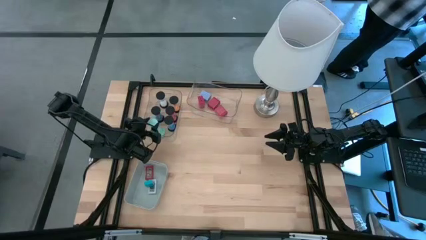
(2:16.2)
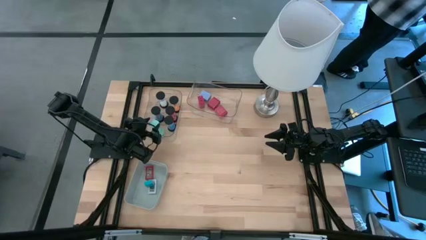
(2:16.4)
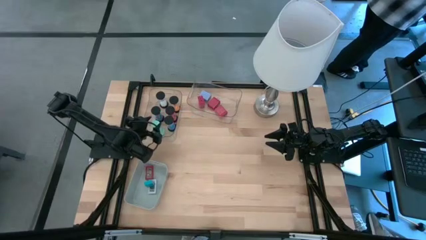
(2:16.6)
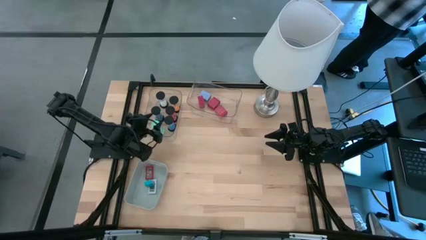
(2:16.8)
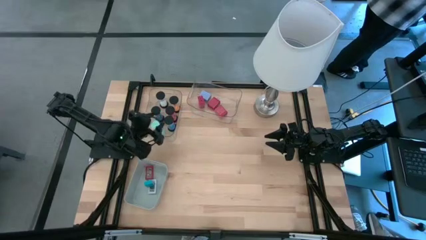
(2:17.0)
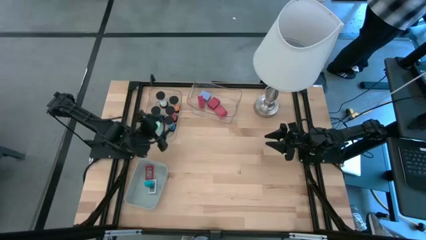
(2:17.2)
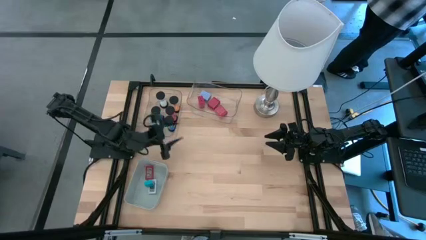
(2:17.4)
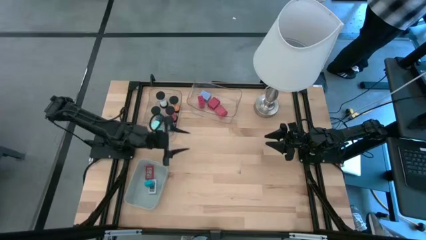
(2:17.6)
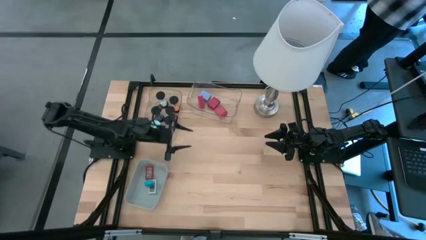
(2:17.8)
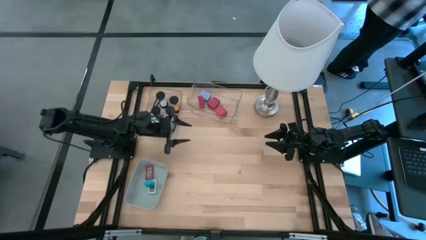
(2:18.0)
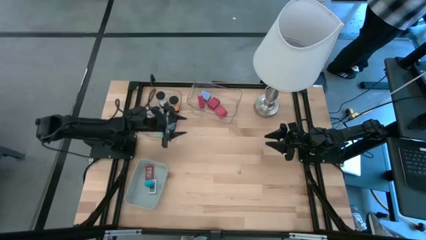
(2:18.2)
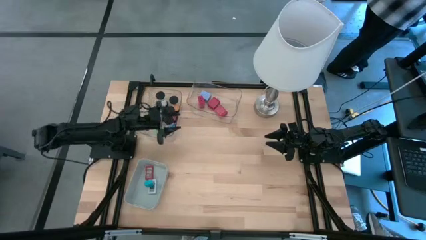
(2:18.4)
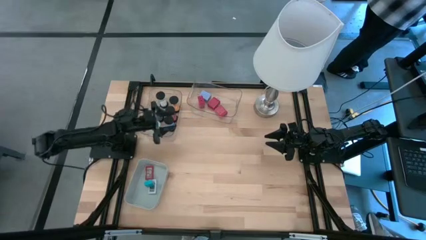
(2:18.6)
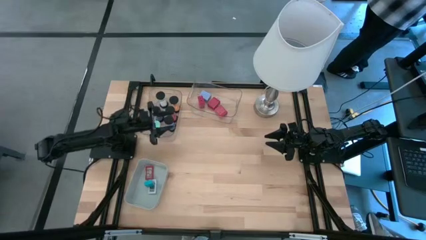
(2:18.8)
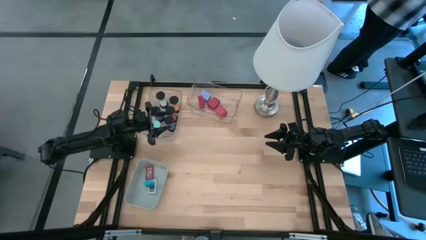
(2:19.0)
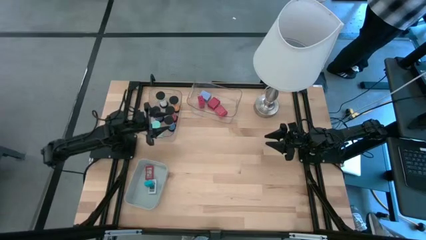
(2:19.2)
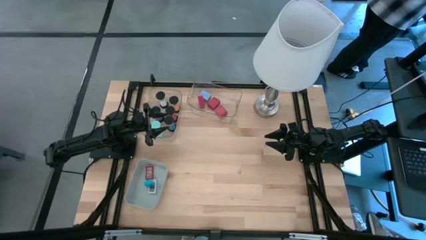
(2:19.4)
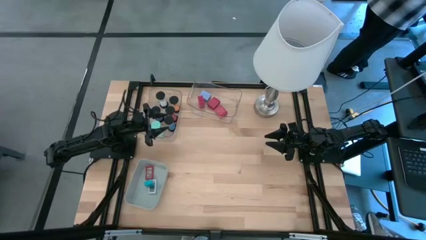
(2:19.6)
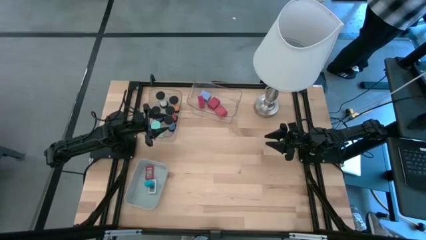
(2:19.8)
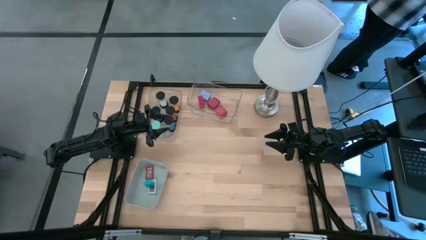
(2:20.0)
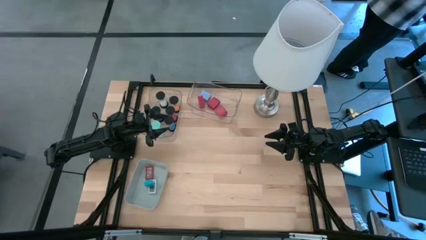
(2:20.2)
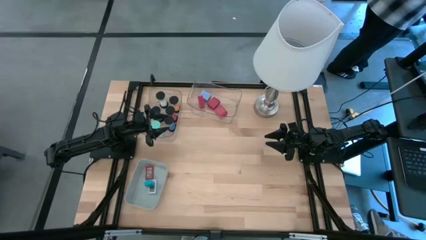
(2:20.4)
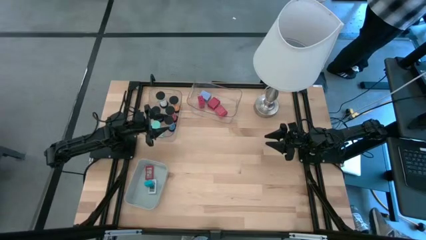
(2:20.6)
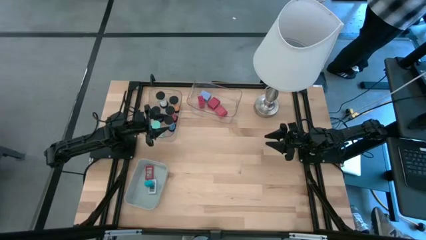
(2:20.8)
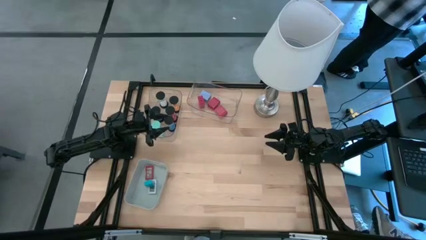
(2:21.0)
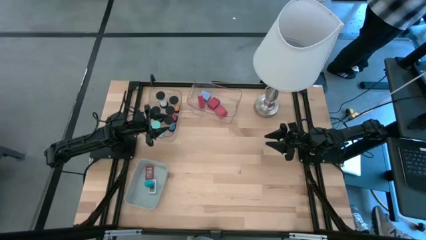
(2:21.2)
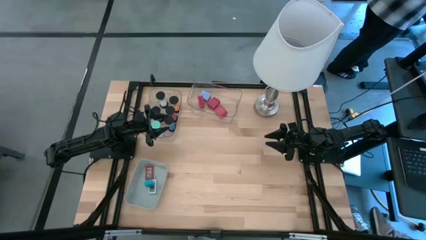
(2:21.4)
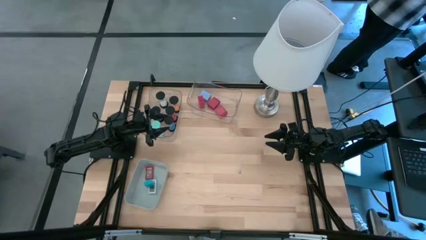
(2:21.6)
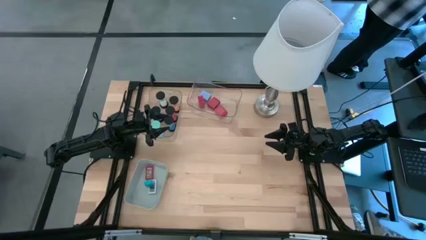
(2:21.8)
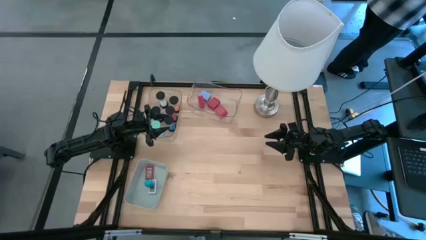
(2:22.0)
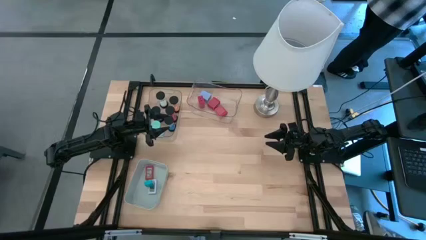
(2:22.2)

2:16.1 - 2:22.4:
Task: Pick & Place Office items
Return to home position

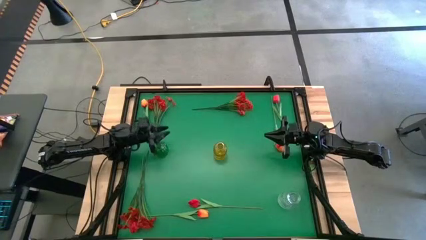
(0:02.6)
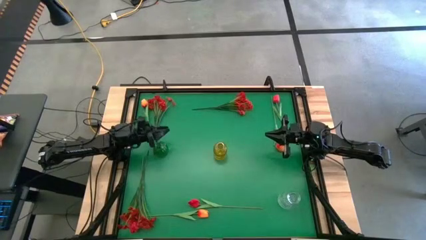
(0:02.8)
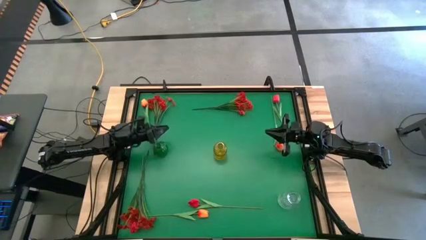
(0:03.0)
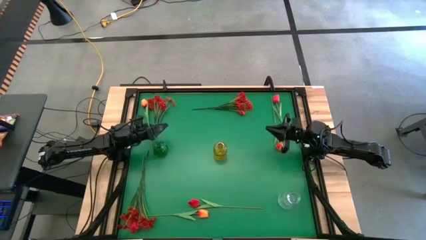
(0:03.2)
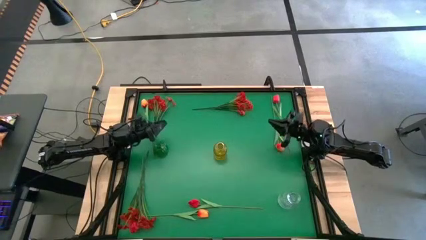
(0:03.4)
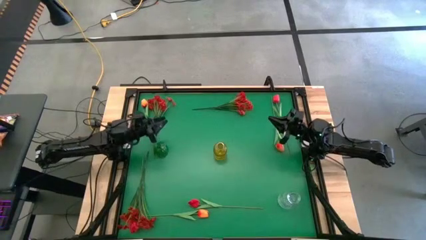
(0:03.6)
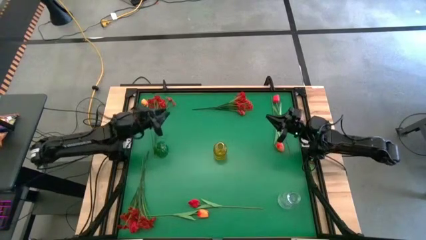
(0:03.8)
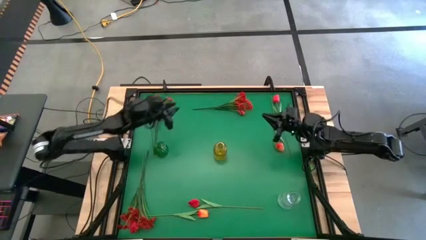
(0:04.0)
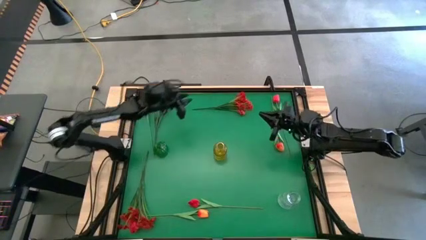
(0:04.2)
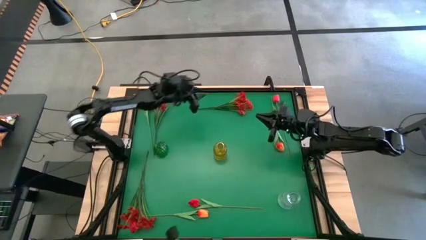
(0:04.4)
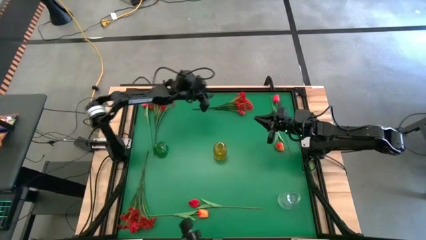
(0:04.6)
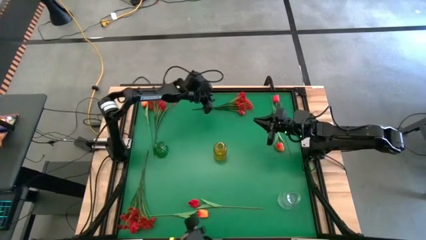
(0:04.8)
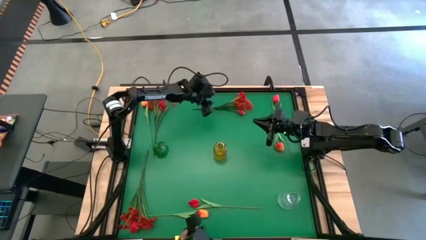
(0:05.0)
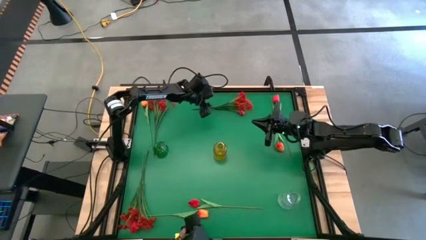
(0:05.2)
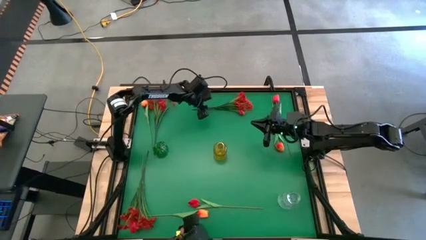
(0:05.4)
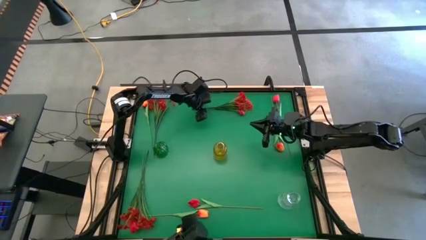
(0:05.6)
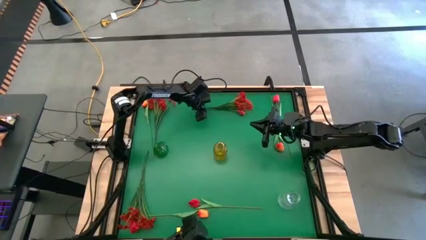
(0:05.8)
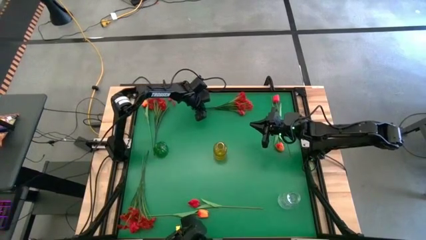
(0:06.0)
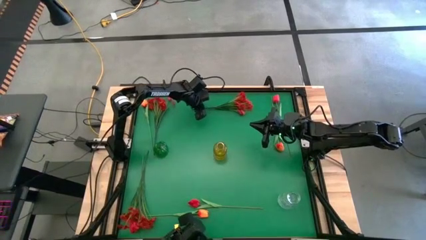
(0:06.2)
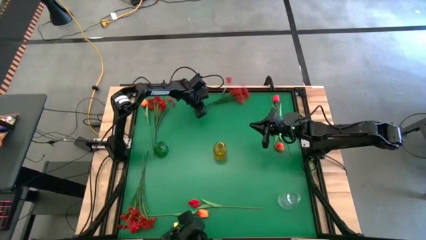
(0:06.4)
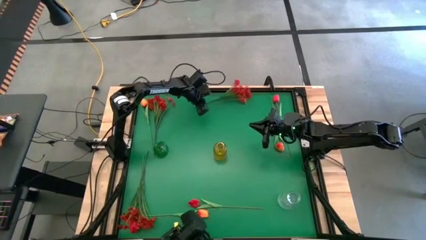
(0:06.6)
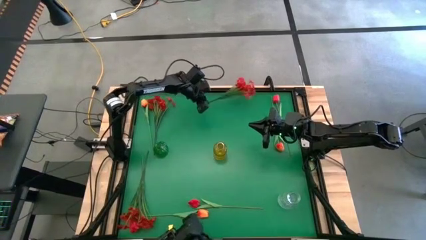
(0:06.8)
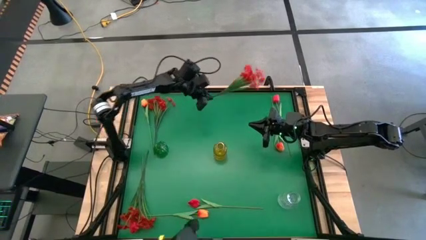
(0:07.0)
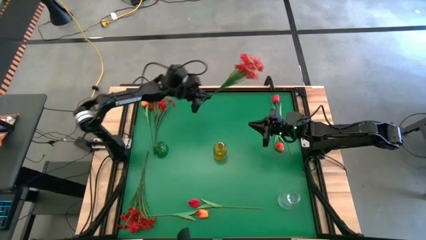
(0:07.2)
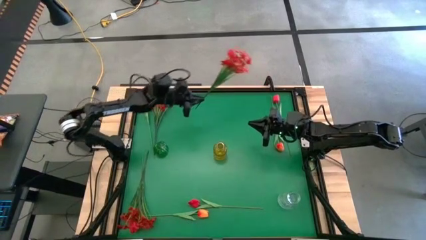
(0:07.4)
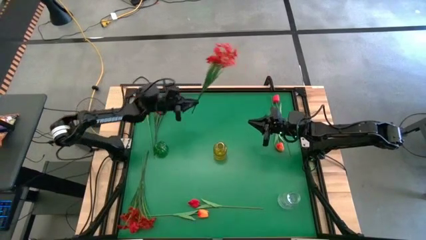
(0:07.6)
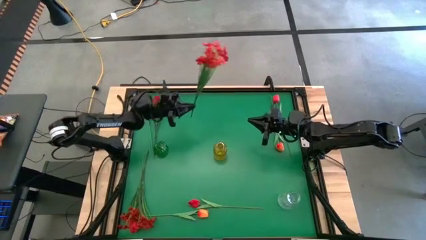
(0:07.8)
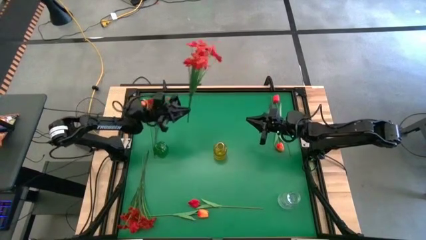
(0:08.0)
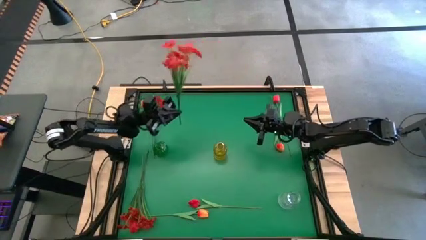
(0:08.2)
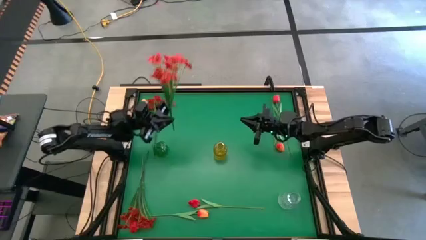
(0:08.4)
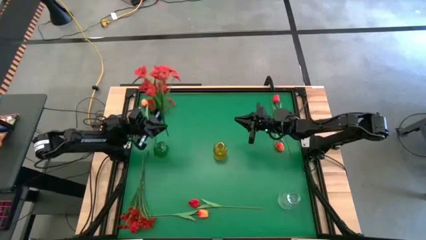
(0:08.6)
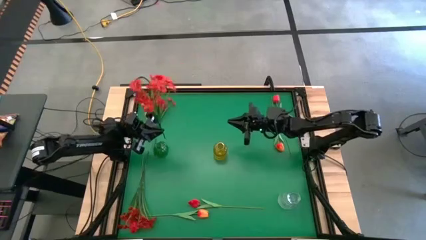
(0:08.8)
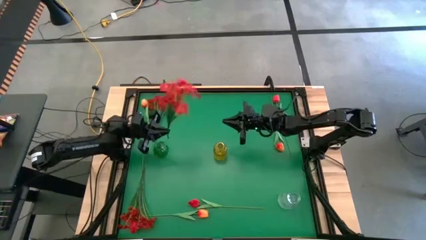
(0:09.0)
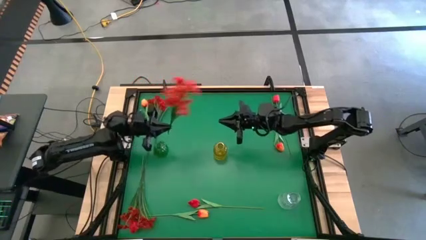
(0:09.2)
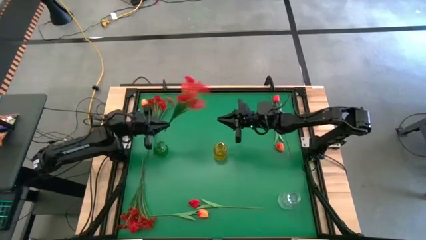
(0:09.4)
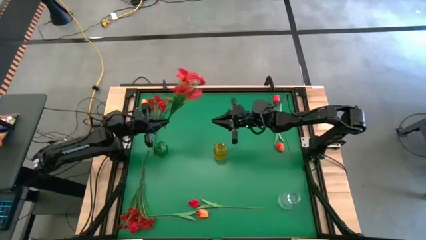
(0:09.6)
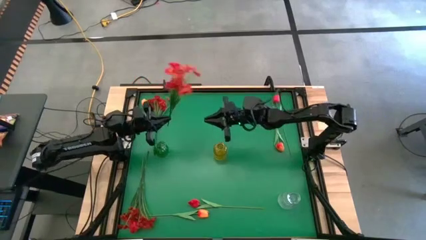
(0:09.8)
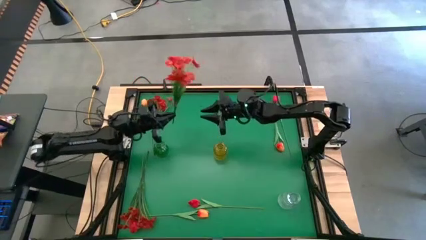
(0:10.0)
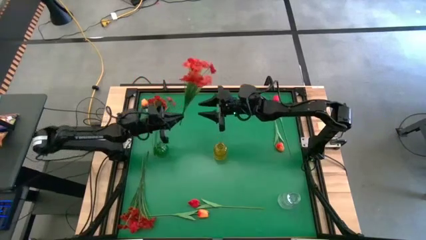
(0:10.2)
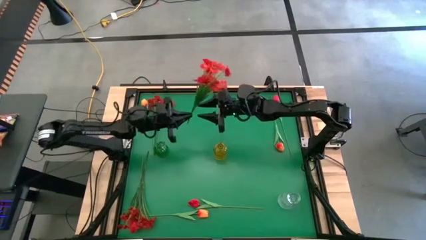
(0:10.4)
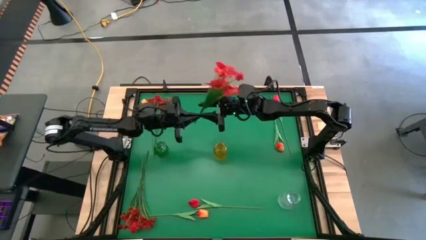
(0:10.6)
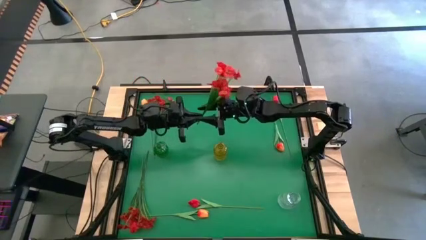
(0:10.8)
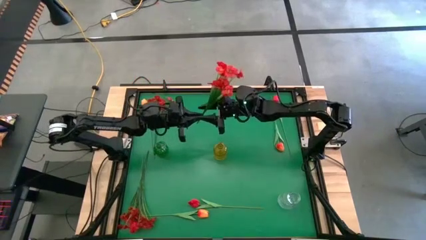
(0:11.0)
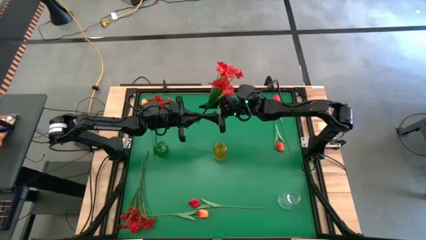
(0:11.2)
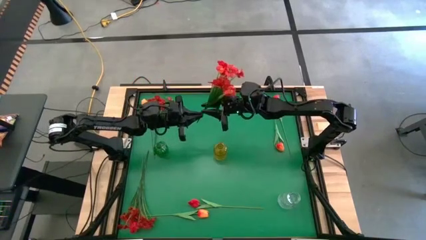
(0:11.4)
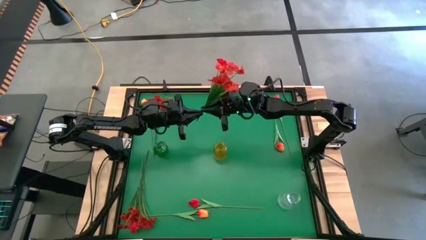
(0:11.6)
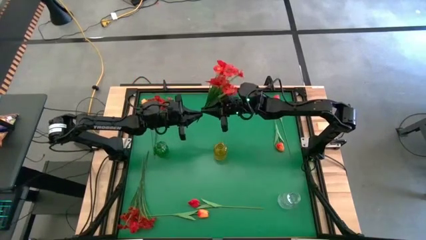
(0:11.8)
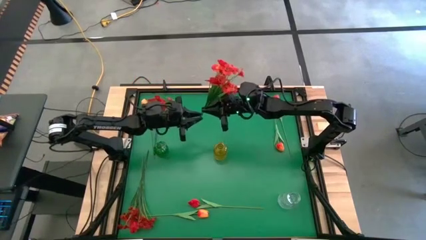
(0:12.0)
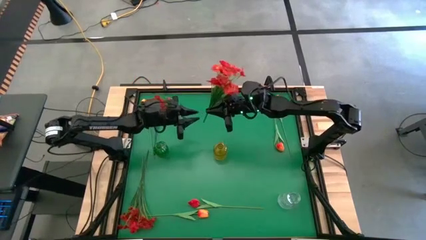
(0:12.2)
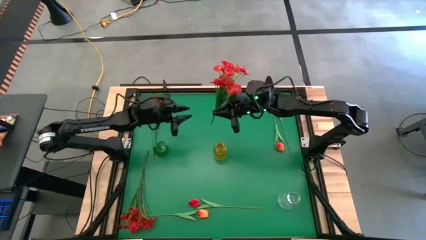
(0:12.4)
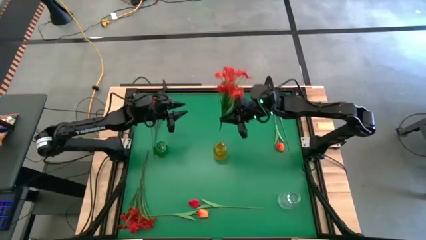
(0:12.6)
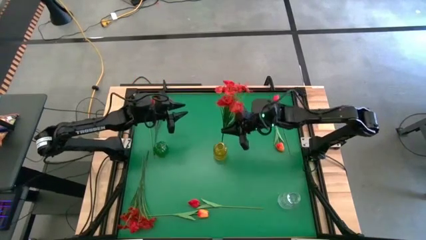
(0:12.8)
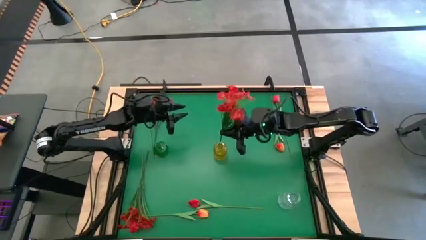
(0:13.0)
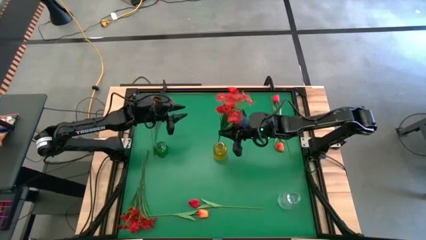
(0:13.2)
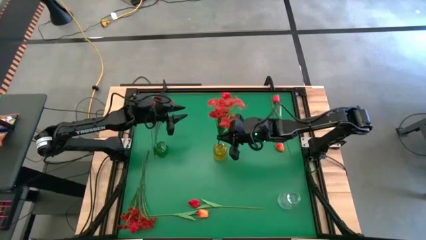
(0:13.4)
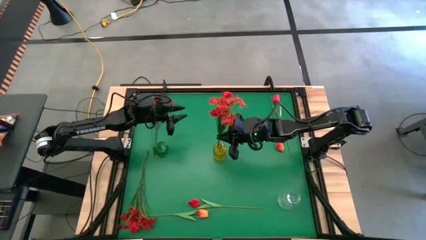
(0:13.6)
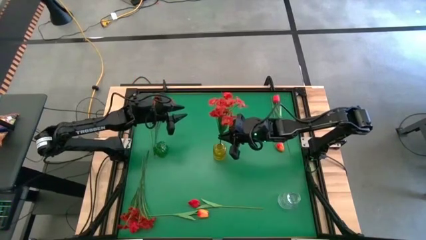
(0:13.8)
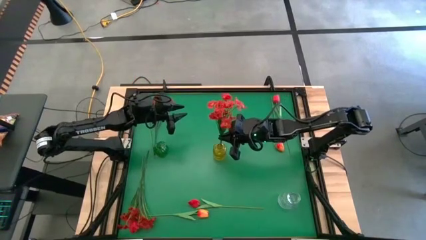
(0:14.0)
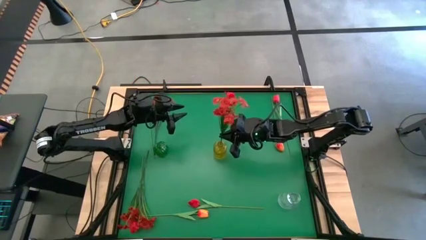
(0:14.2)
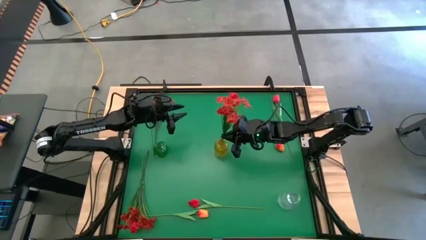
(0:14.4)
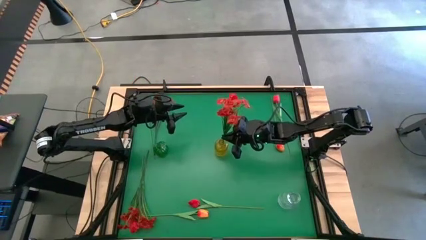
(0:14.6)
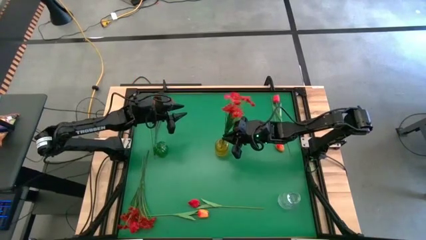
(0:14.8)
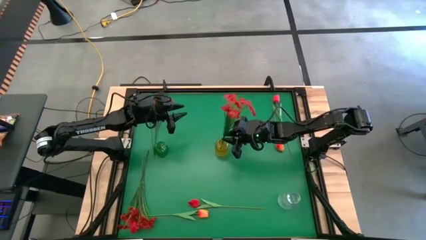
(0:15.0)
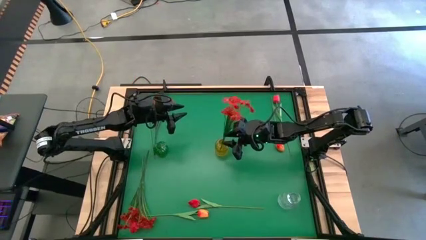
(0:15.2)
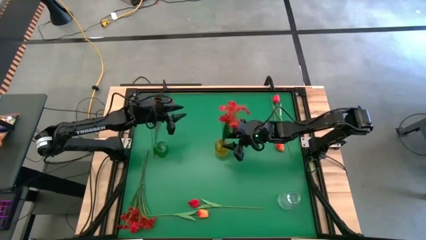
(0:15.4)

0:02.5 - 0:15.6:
Task: Sort flowers into vase by color
Put the top right red flowers into the yellow vase
